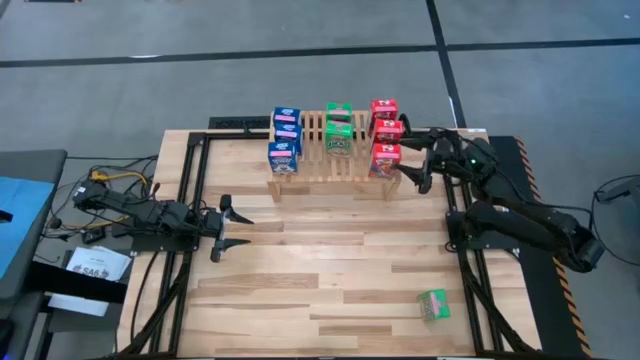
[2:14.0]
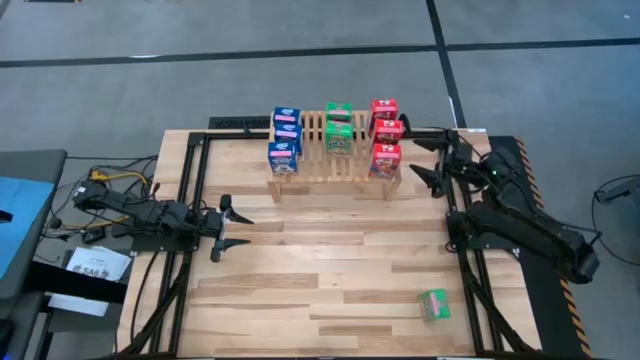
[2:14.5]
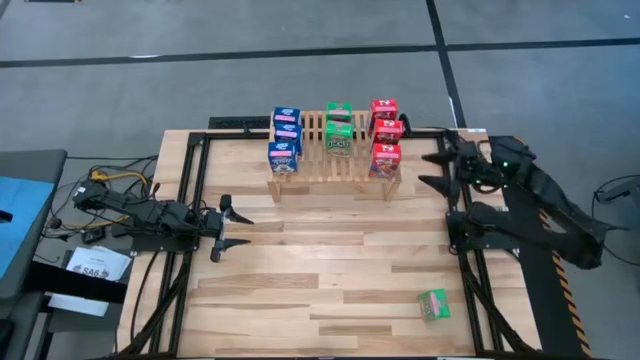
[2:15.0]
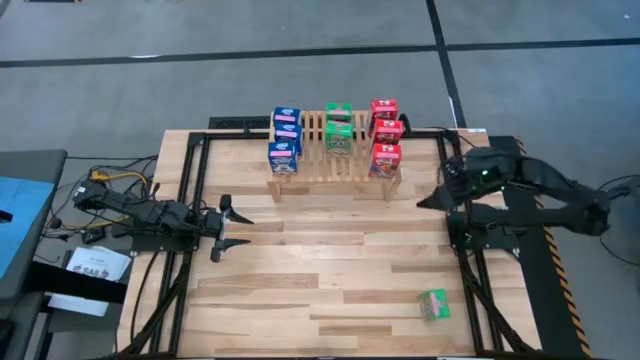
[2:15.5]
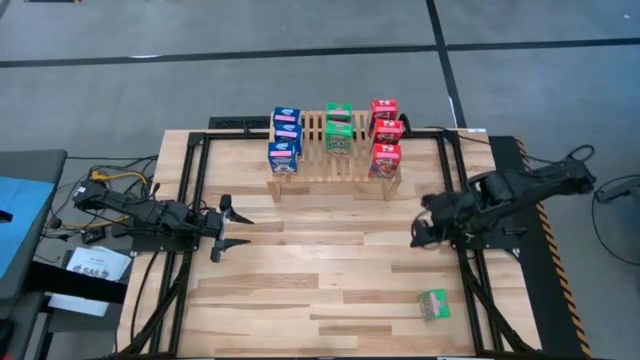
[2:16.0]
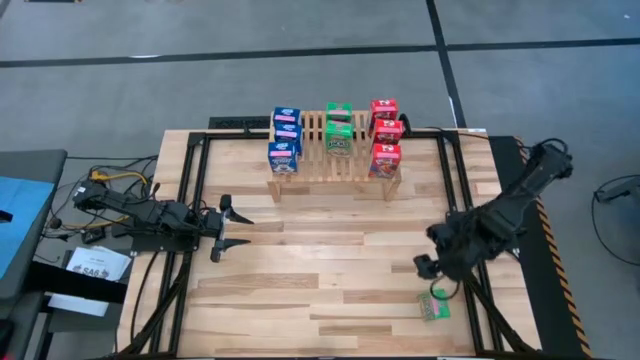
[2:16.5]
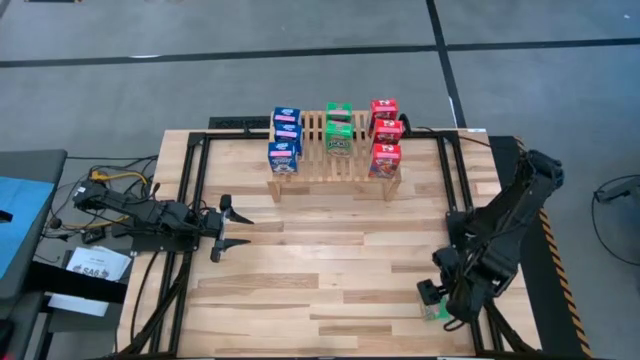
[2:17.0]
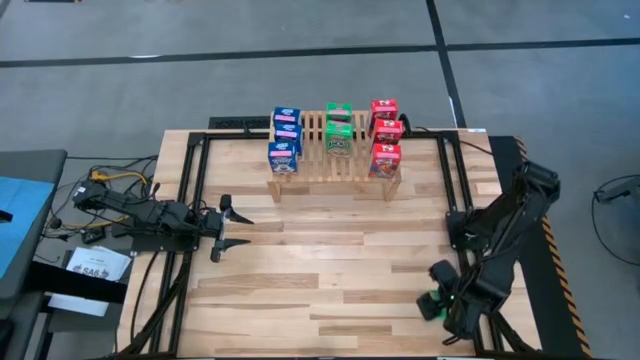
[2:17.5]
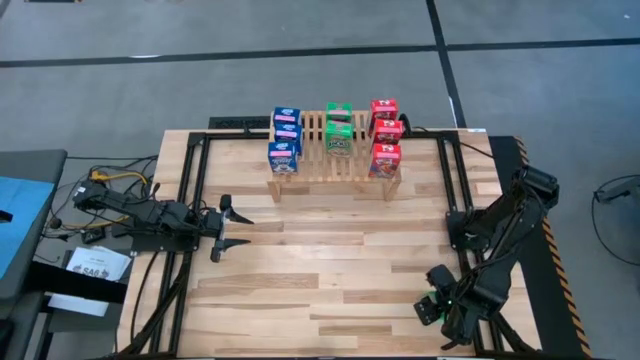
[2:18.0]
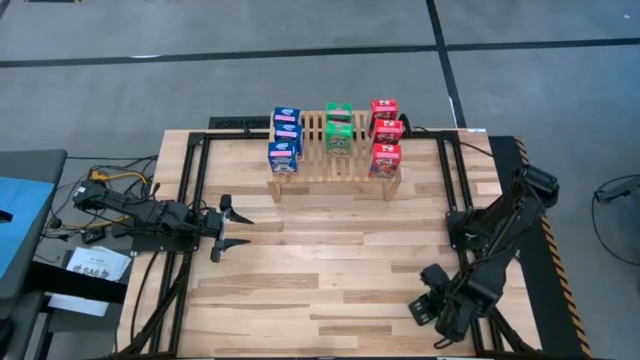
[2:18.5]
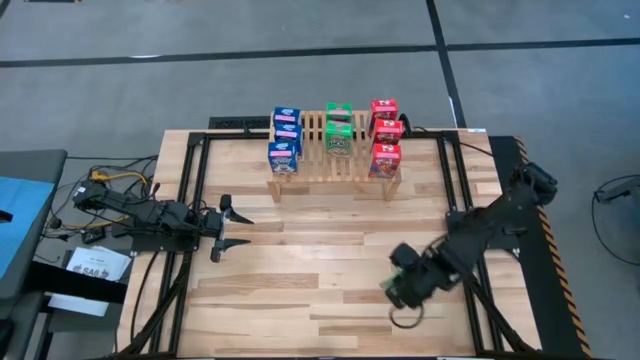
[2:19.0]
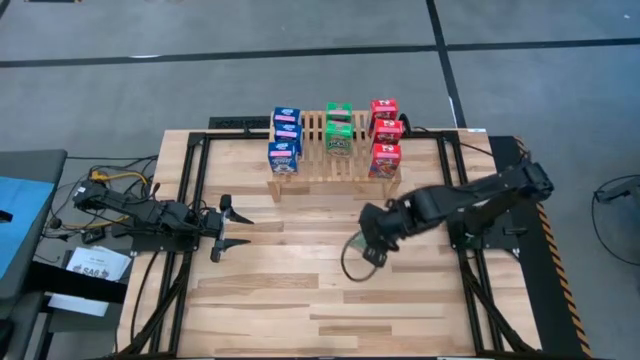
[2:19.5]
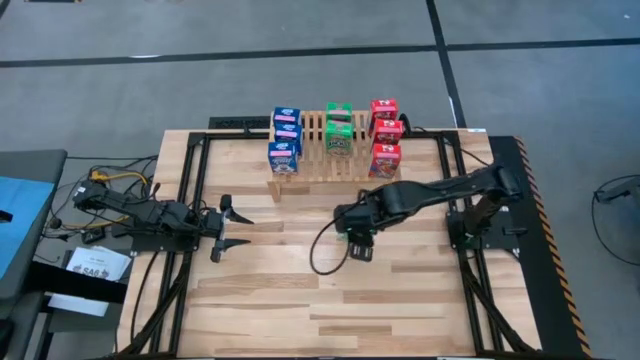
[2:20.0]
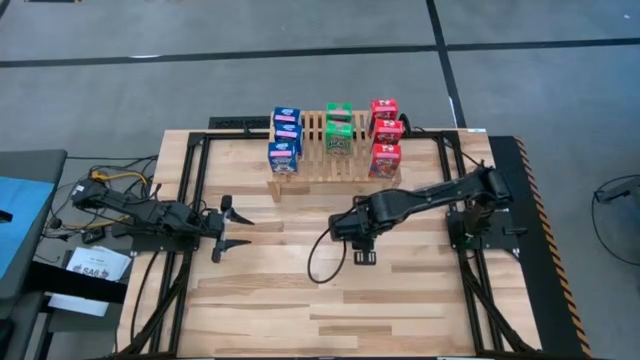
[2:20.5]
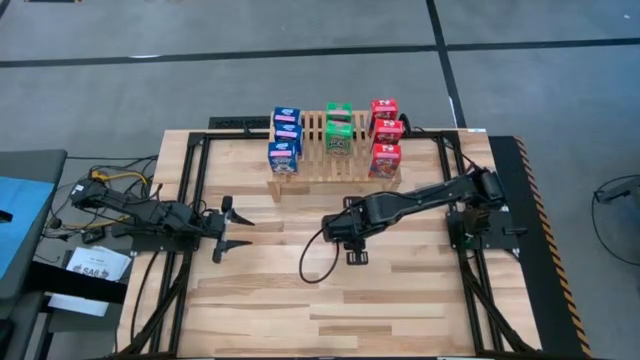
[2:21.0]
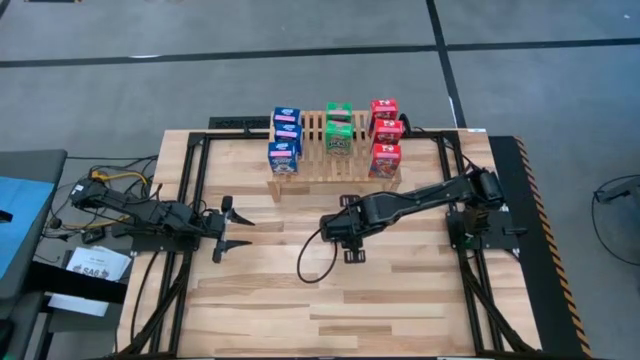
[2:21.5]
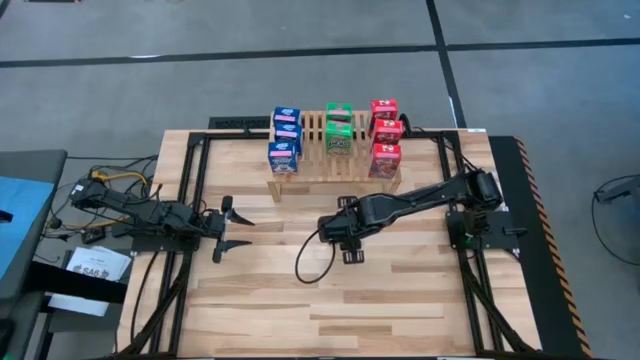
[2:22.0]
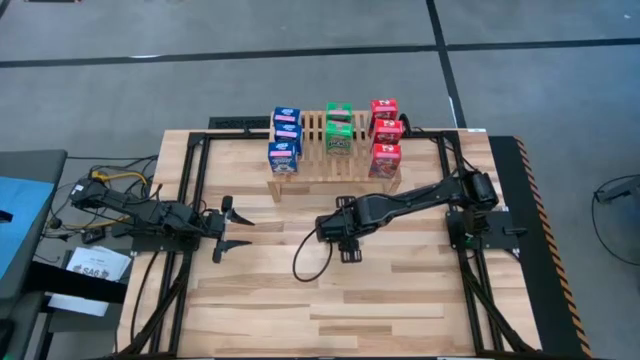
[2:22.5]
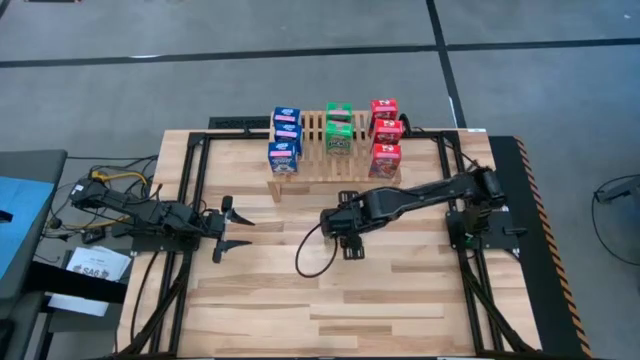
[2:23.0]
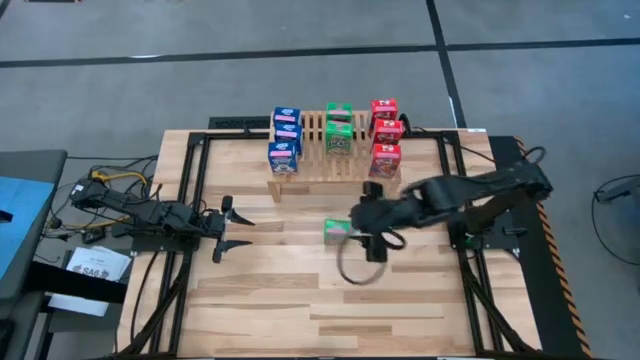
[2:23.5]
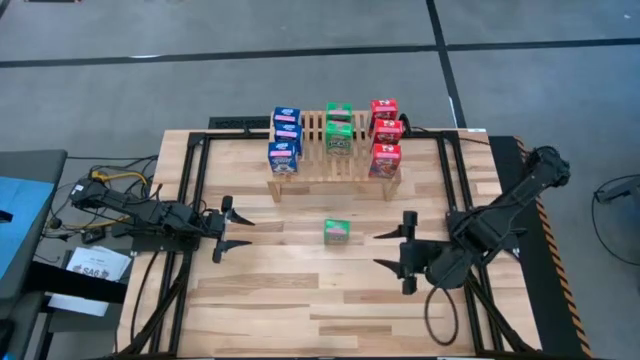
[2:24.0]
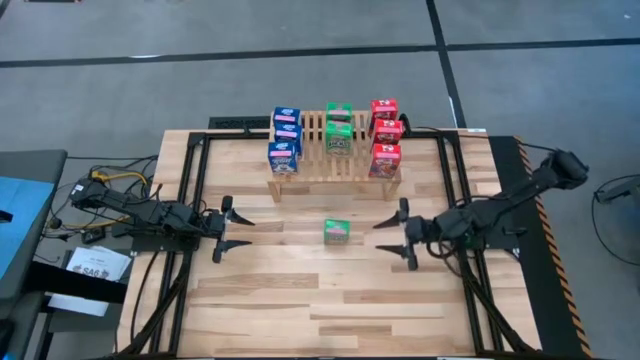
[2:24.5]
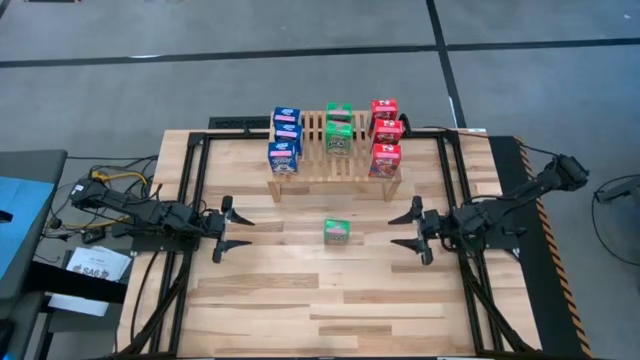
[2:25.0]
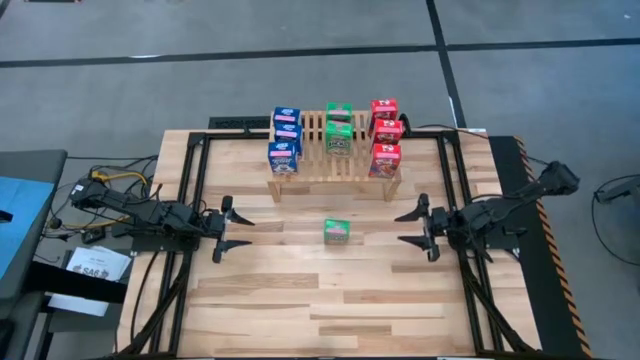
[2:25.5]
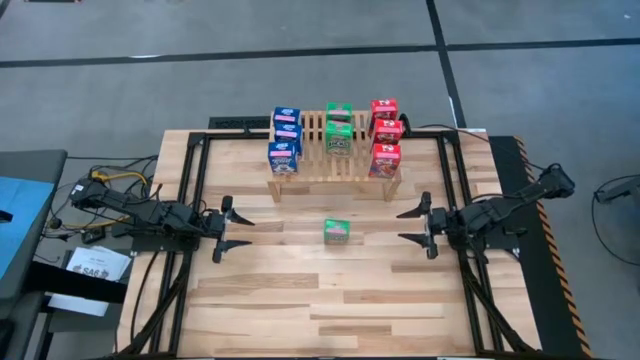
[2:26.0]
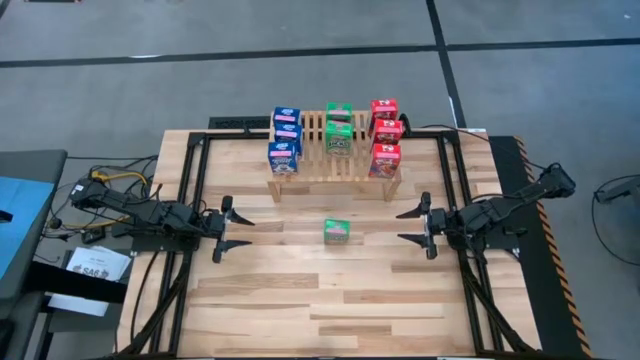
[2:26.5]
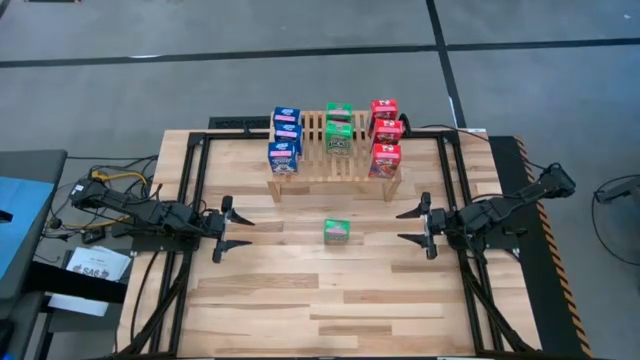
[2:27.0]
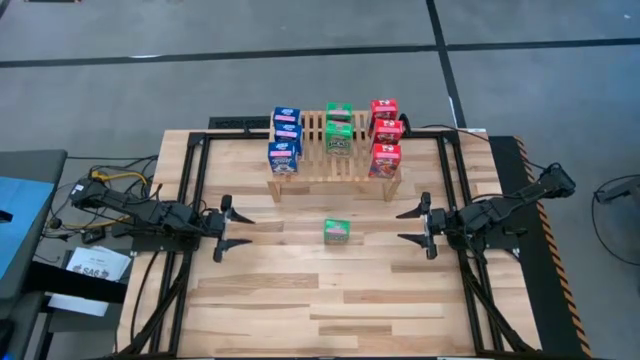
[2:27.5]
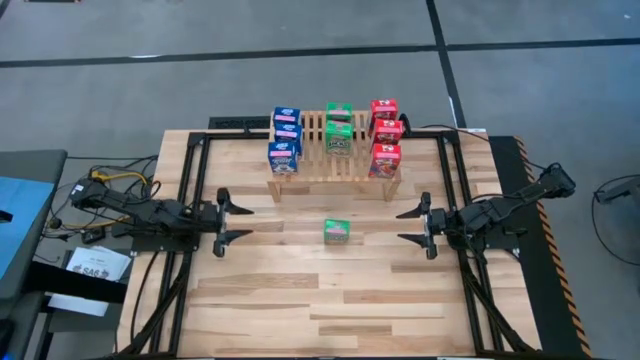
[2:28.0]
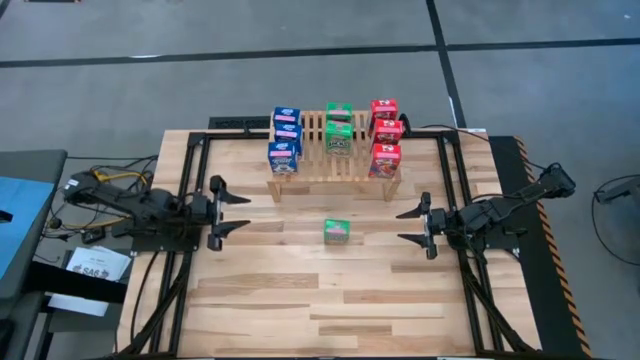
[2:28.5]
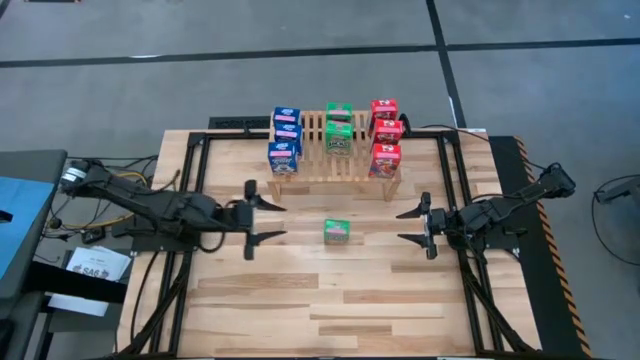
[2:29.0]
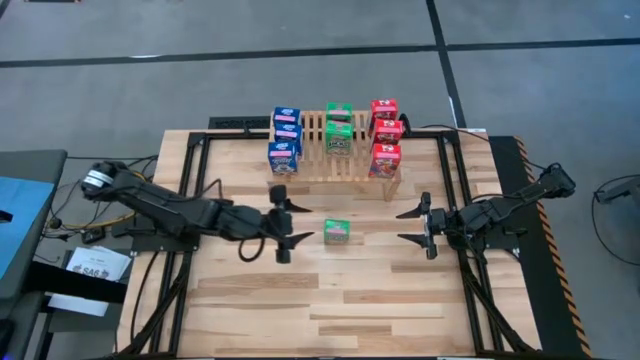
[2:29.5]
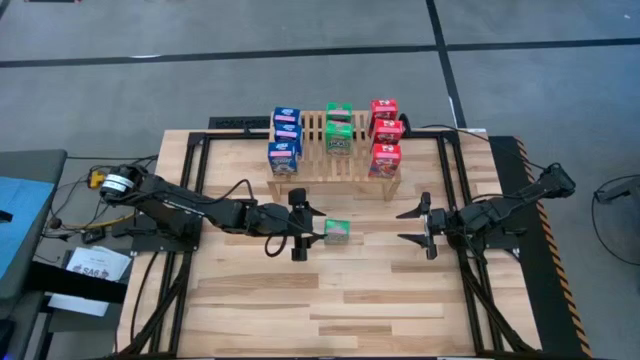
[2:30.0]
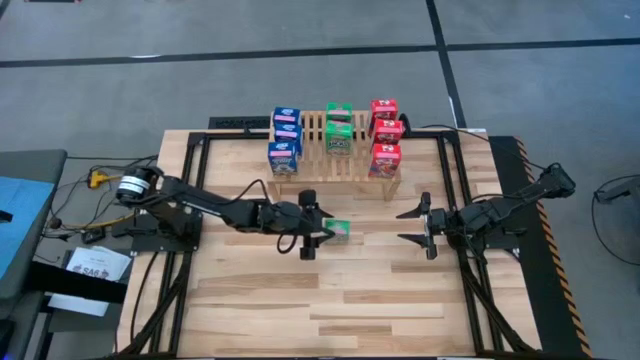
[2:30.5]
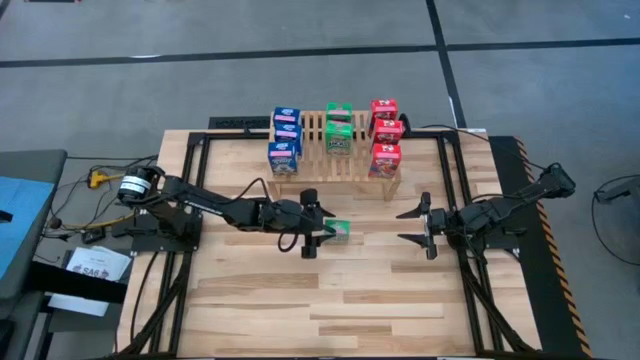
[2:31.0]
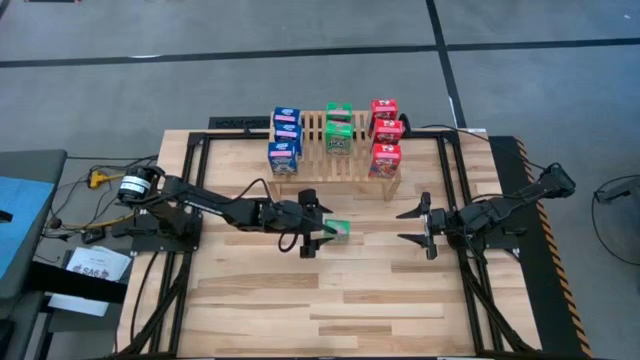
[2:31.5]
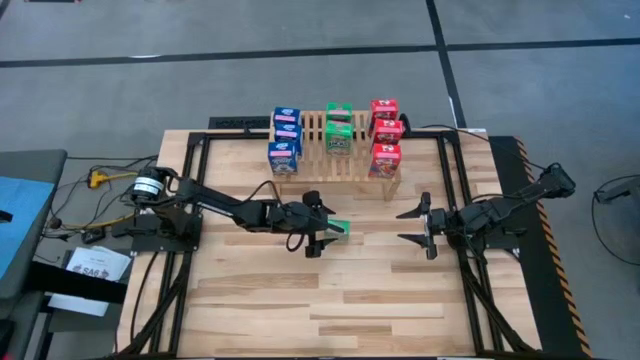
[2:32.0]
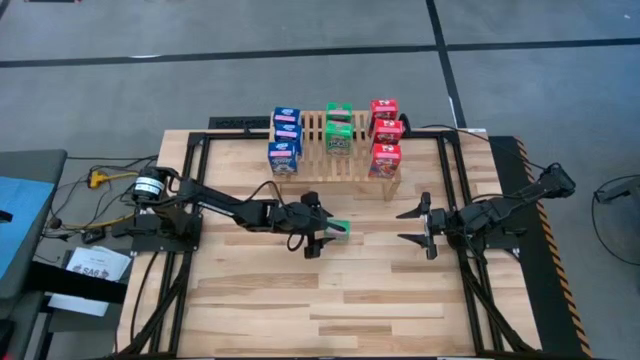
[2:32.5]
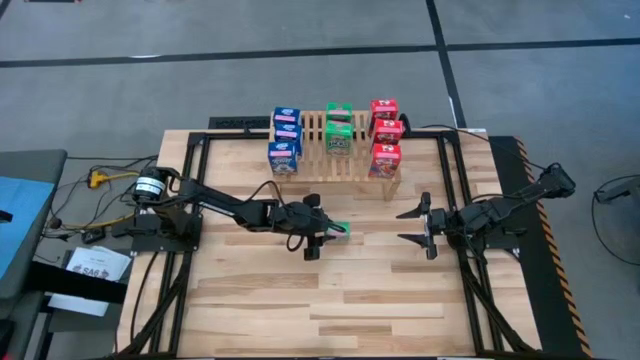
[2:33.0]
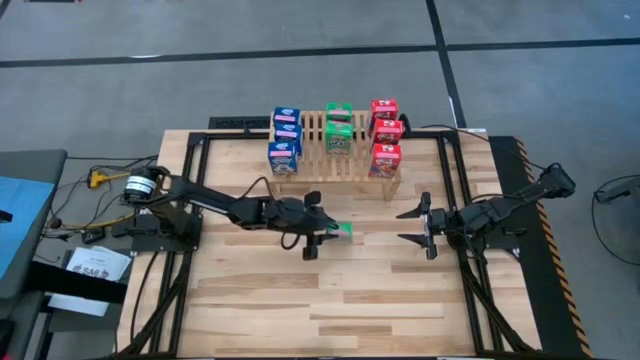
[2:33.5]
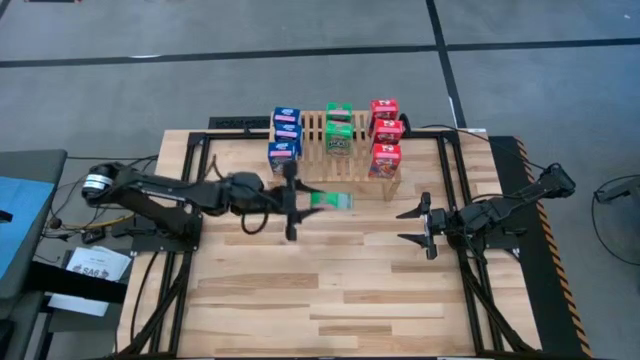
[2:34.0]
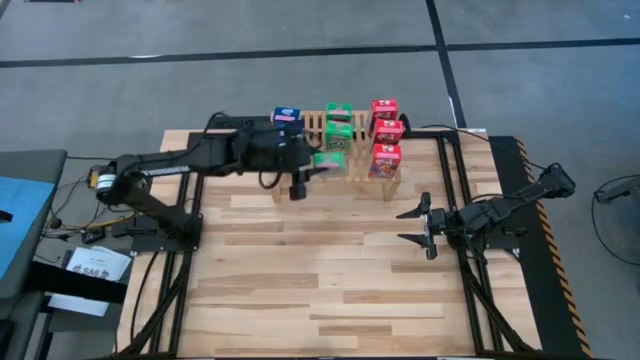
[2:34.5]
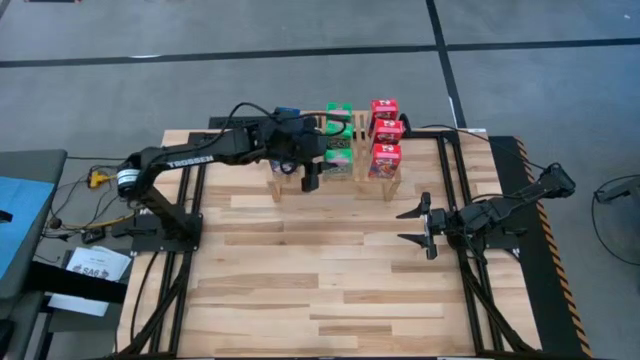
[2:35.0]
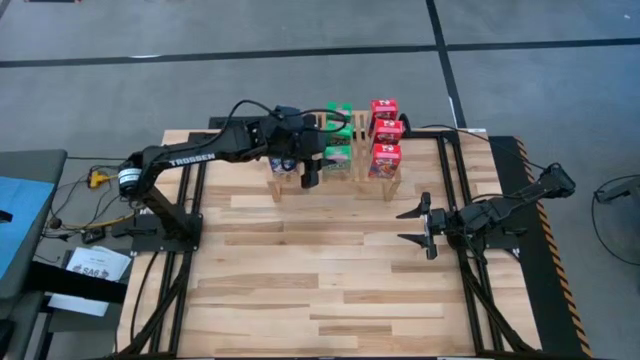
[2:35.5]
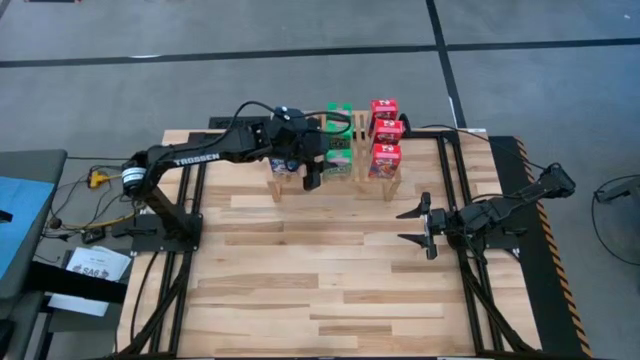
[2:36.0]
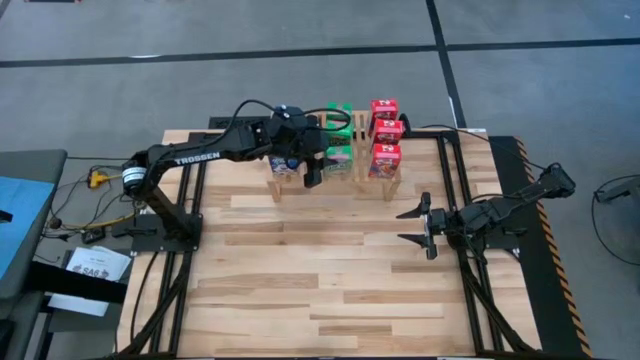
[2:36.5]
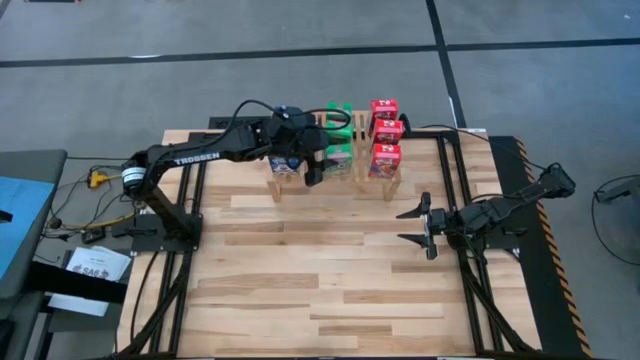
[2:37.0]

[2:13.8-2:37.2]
Task: Stack cereal on shelf
Put the green cereal box on the shelf aligned with the other green cereal boxes
